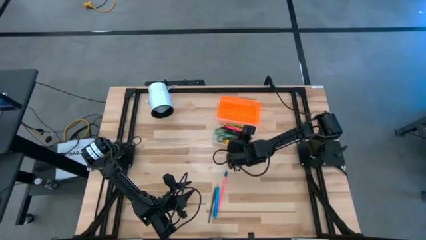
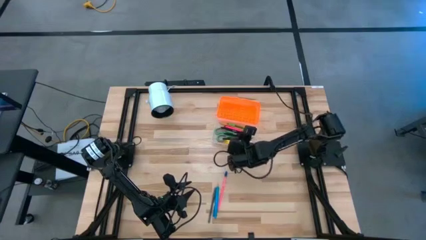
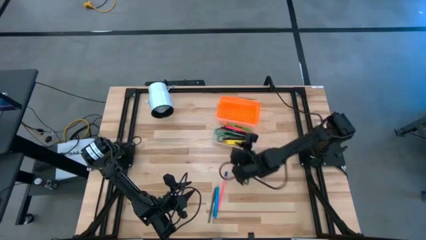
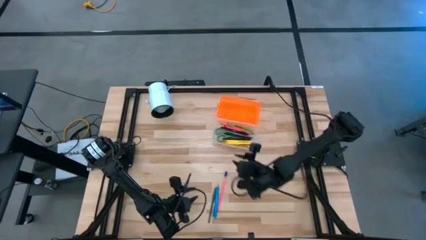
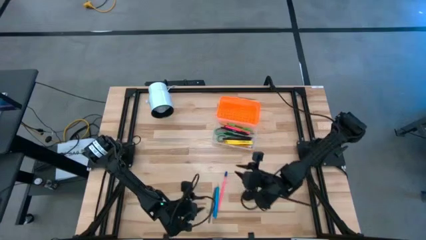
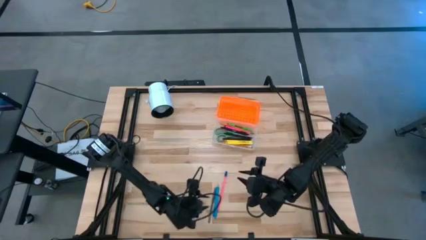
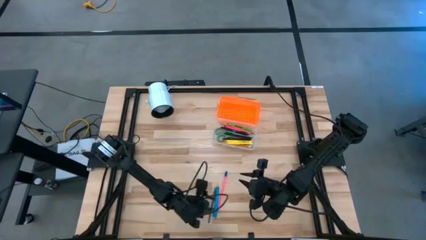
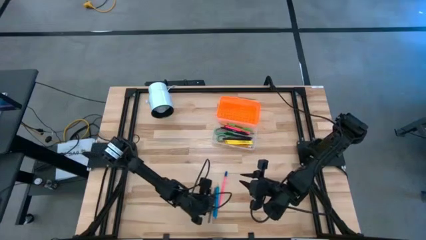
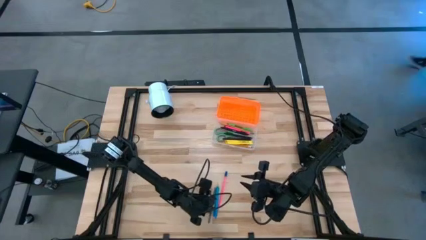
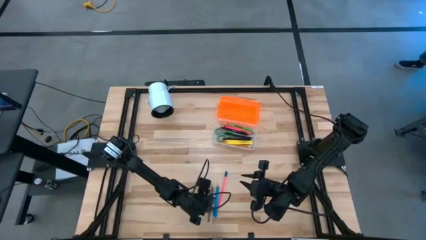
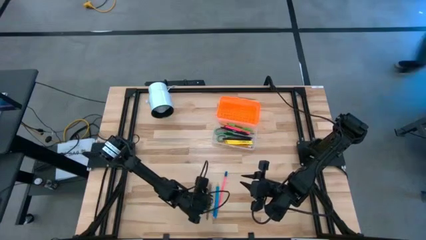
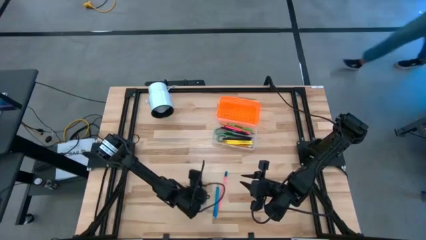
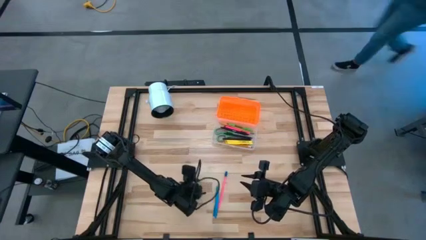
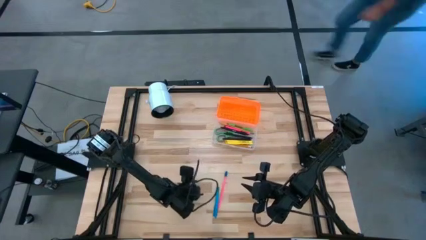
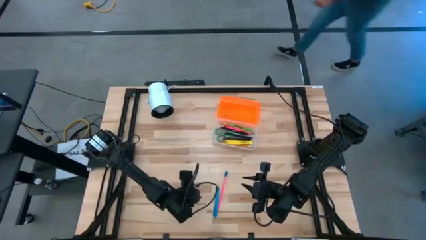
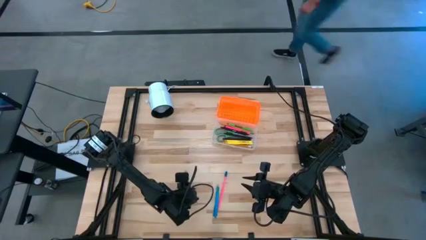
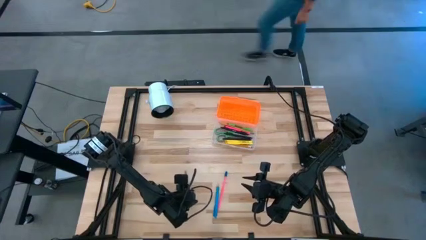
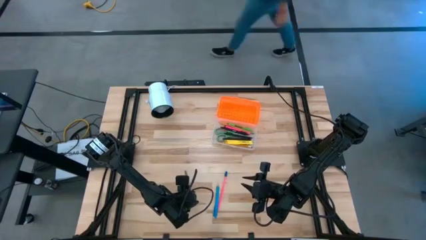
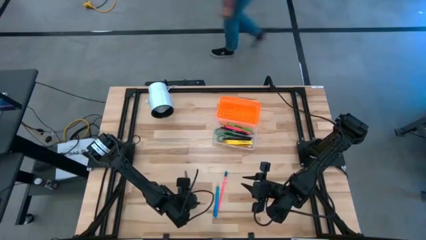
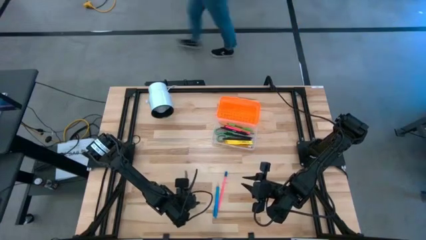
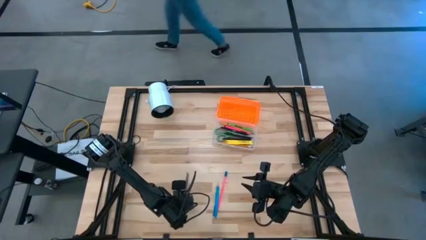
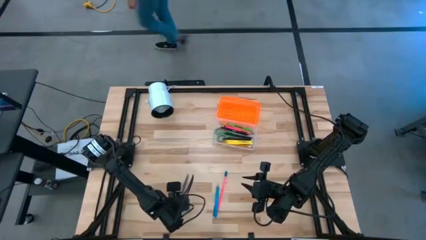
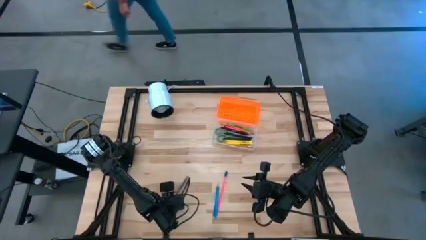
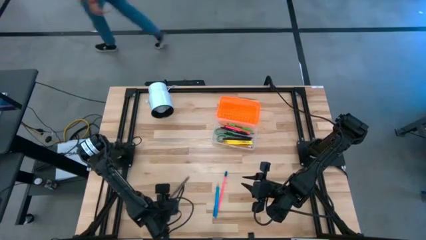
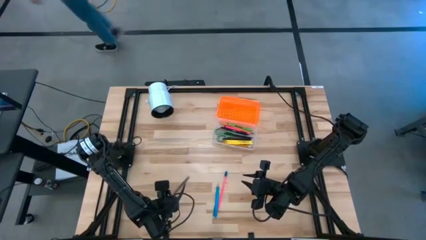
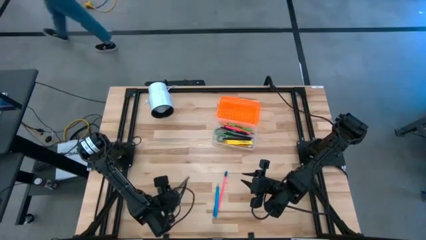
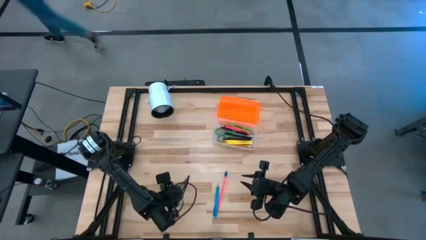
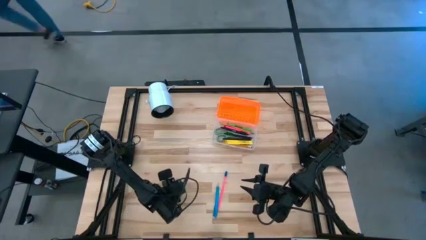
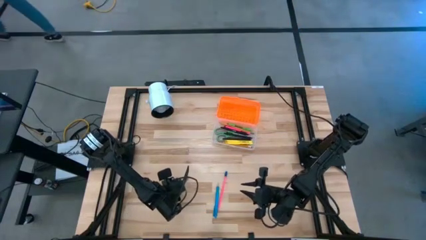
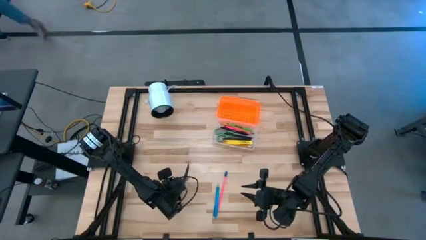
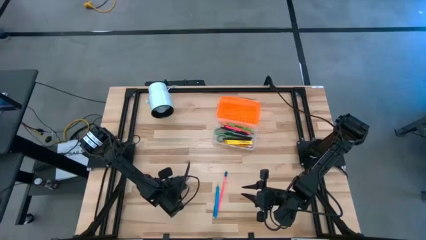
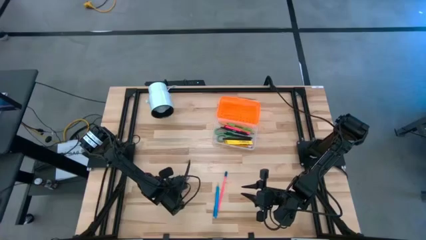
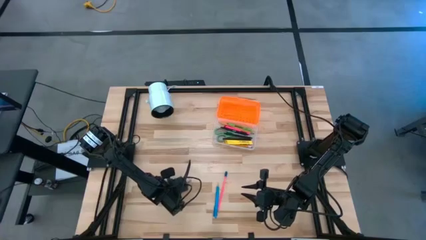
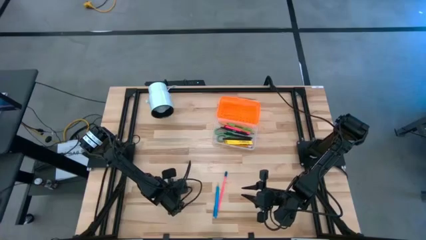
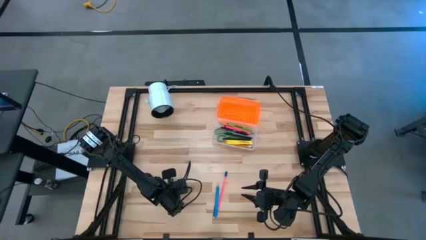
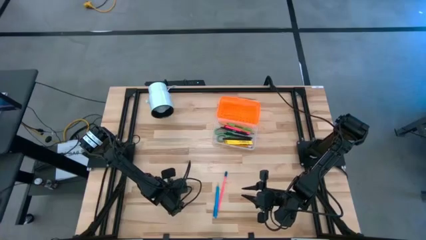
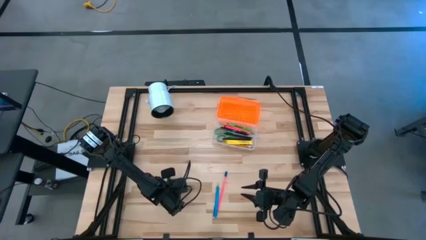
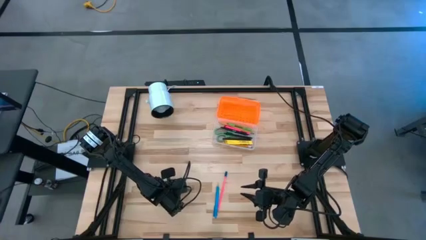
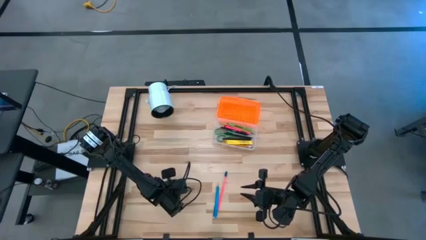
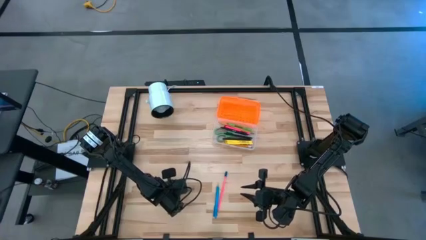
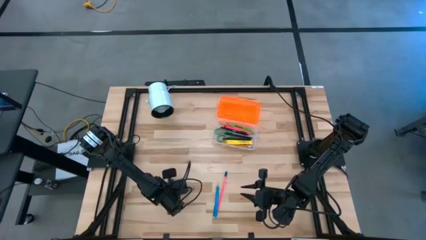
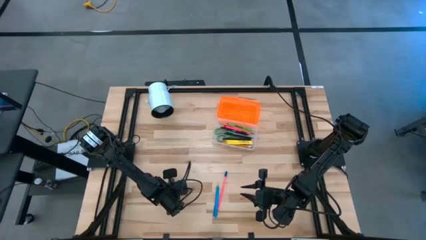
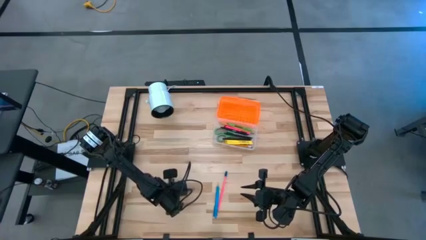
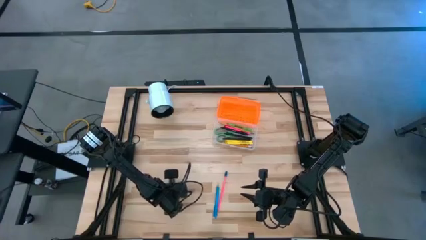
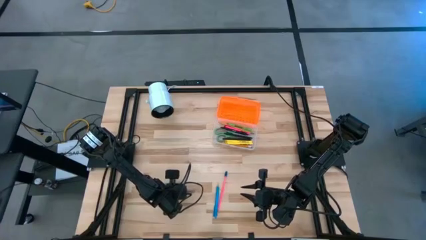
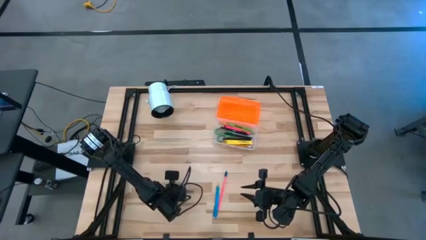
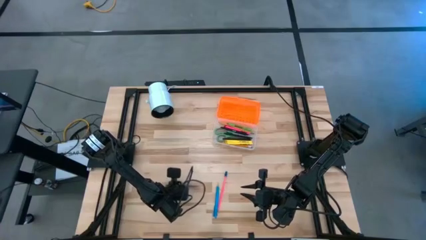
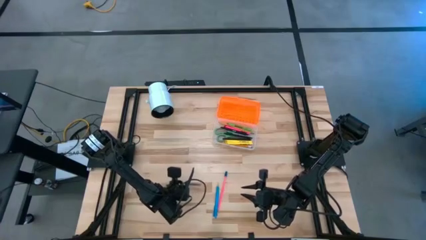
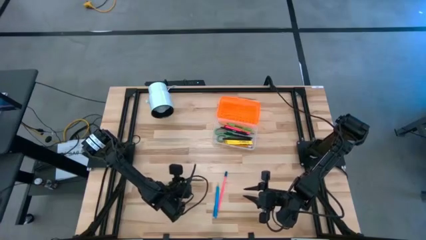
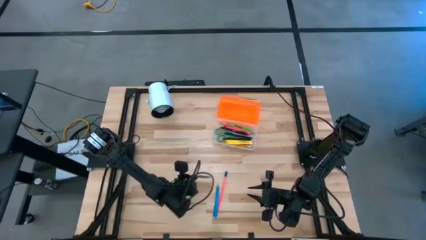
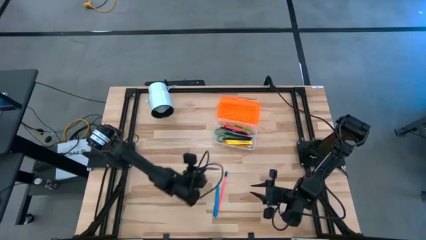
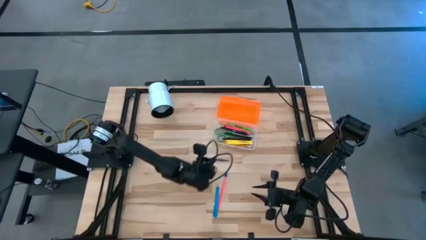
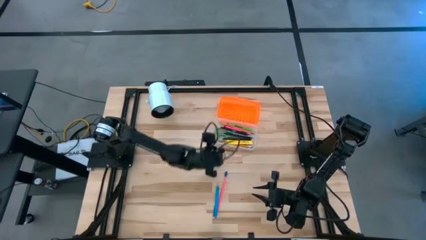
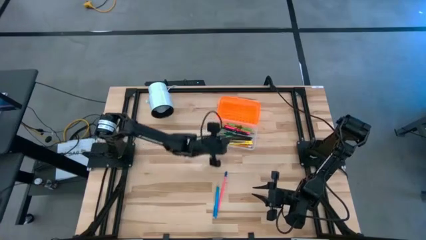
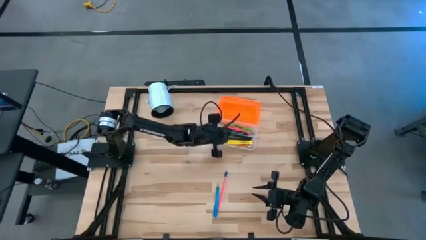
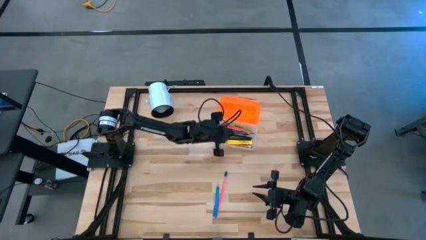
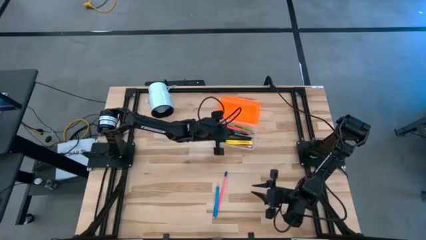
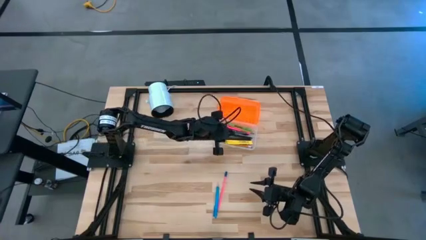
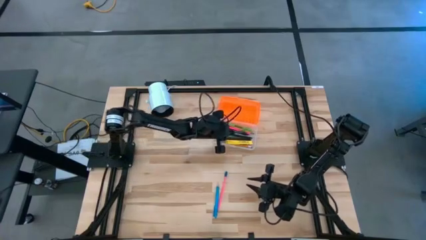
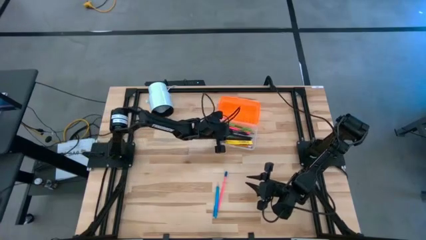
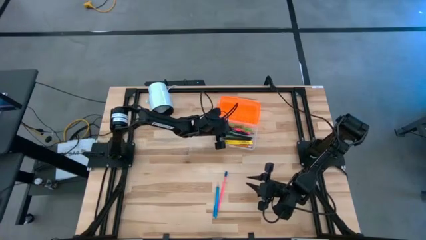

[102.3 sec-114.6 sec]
Task: Pick & place school supplies into a supply box
Put the grey pen into the supply box

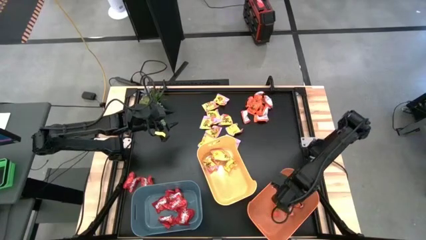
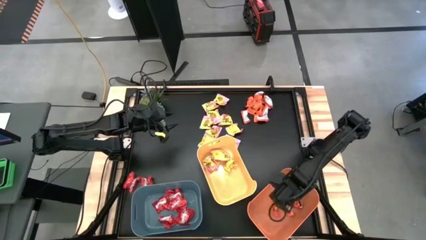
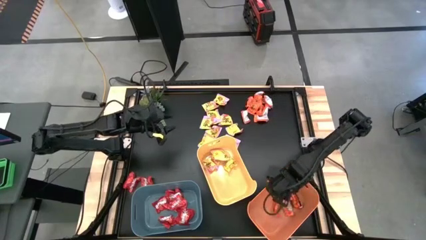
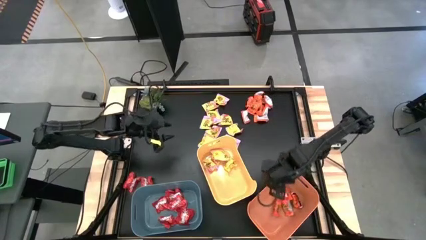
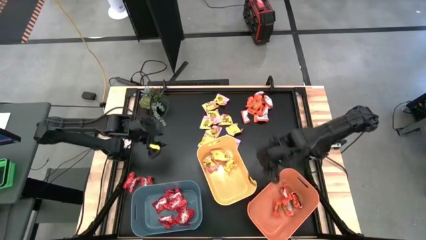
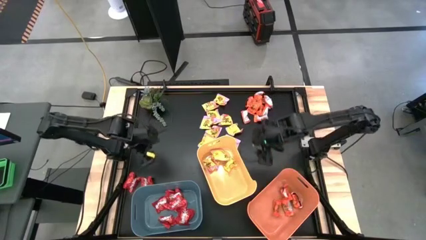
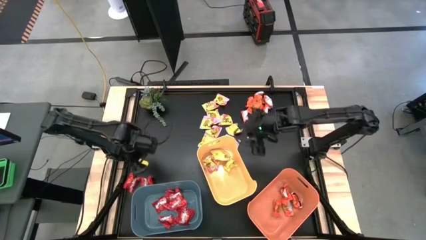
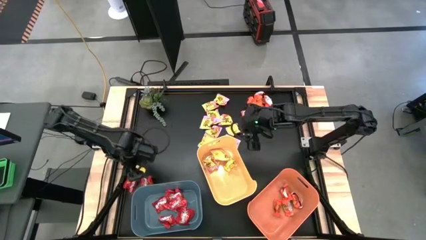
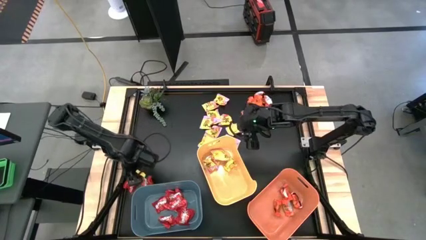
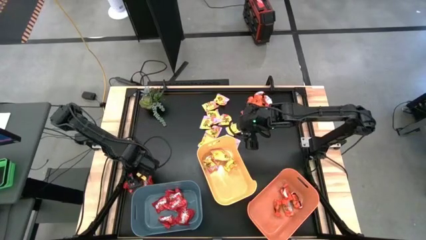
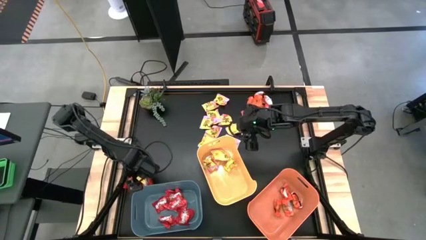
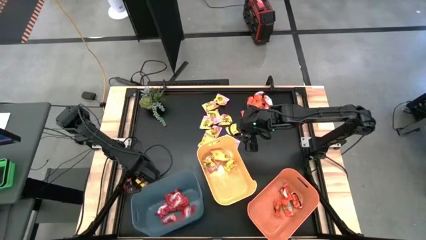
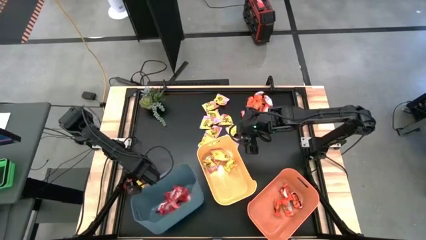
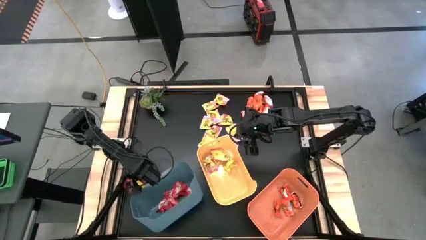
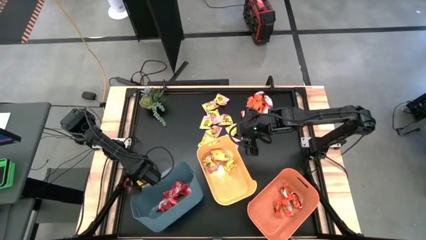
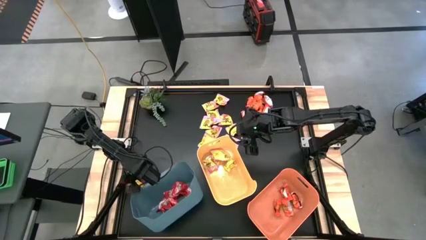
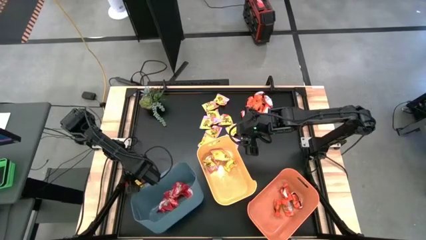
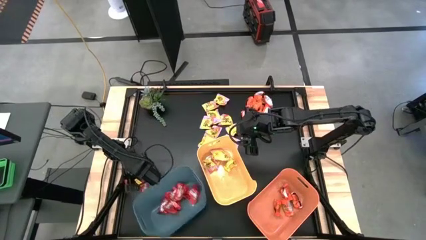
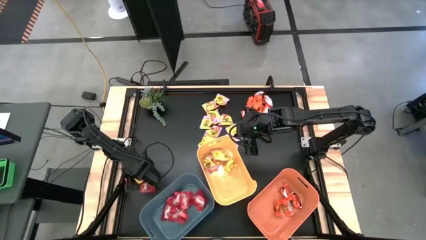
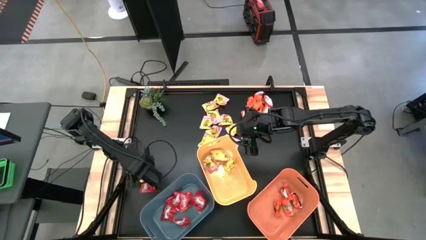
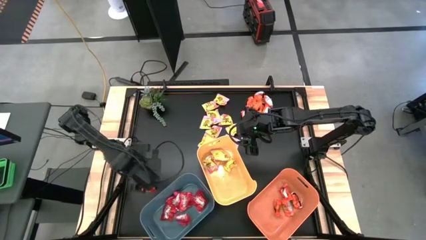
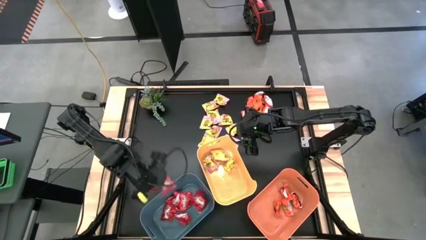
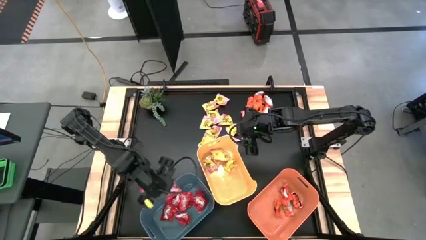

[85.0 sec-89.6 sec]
Task: Sort candy
Put the red candy into the blue bin
